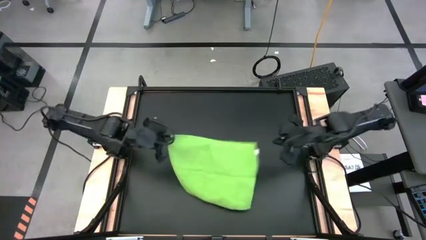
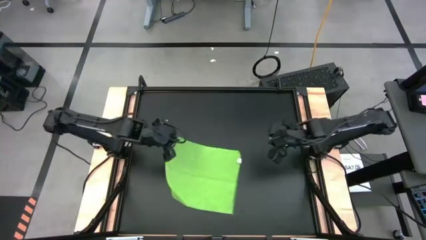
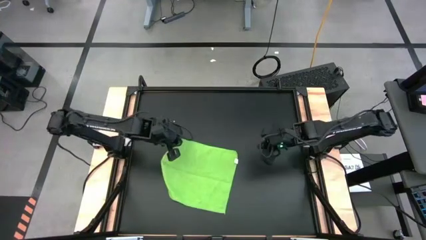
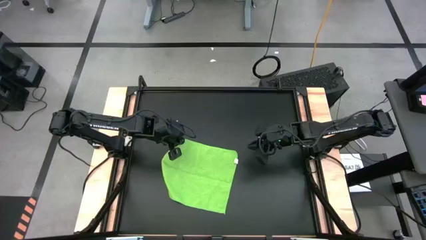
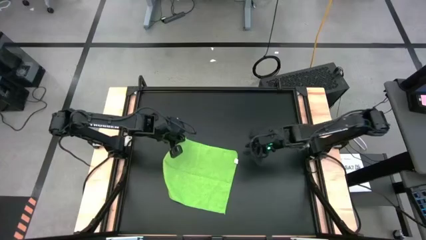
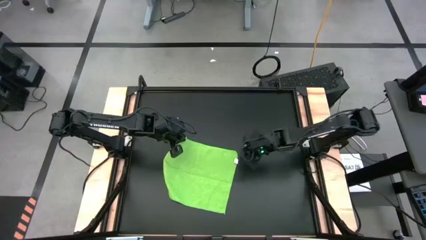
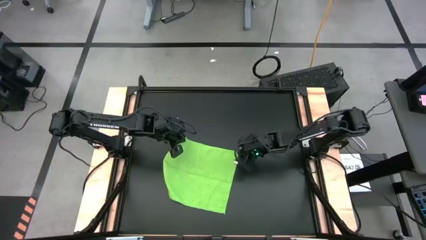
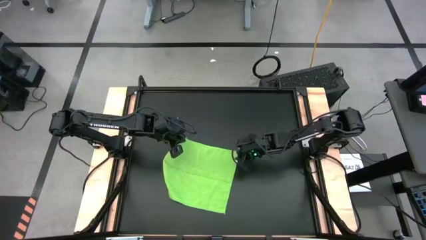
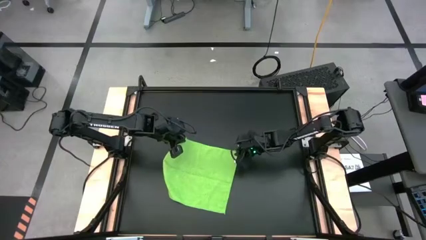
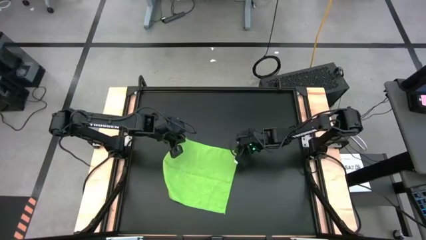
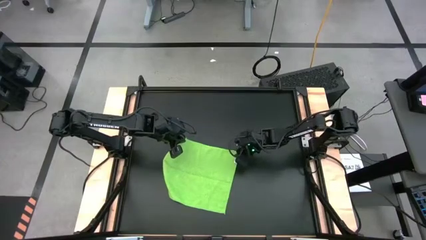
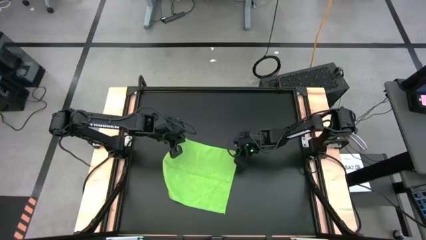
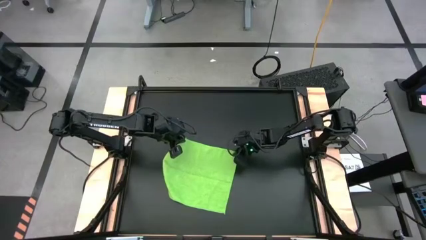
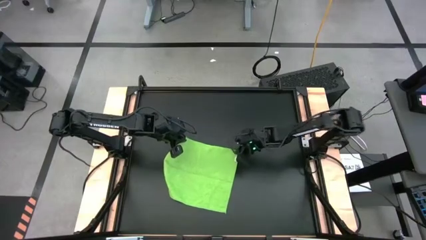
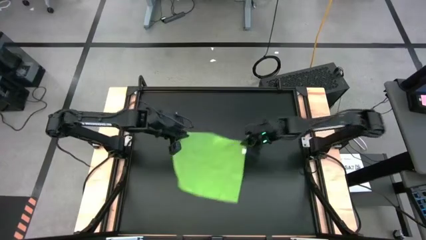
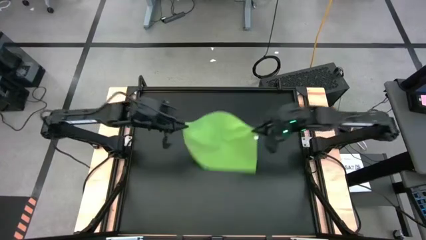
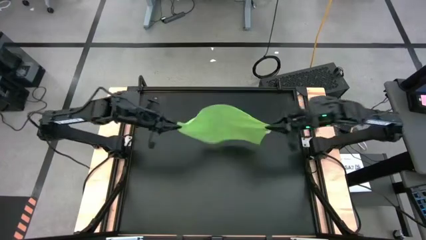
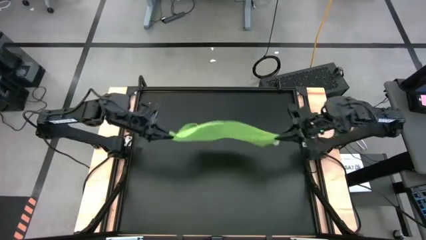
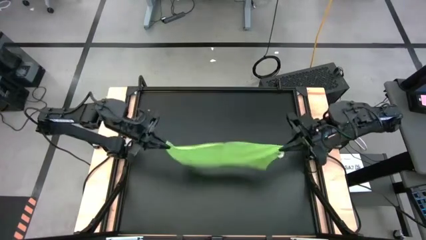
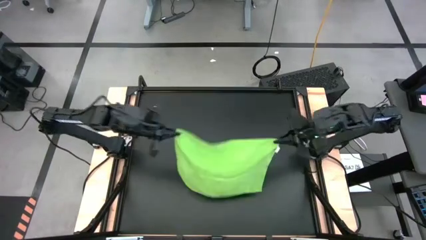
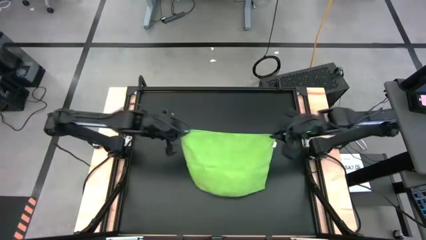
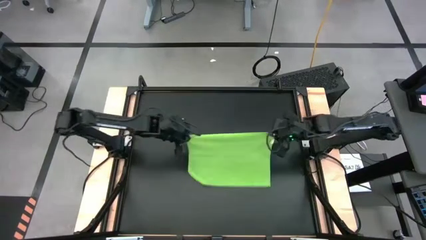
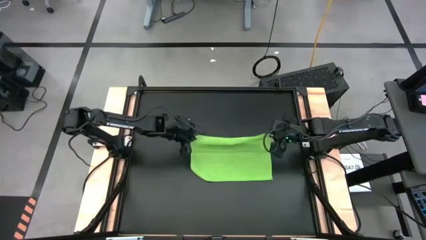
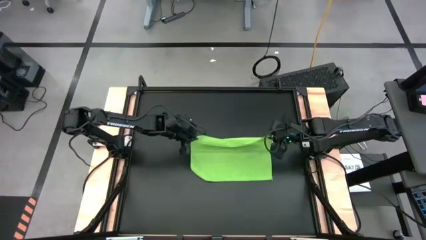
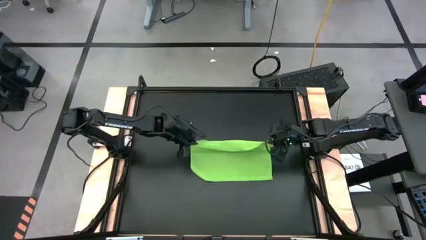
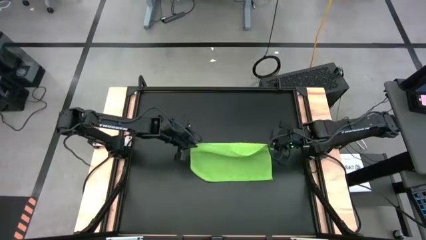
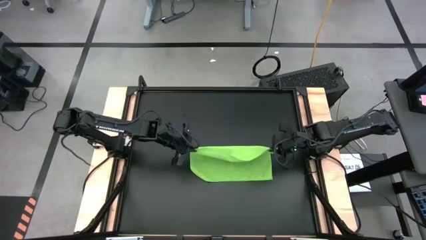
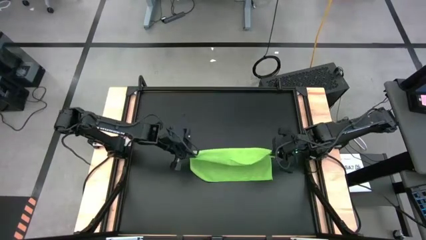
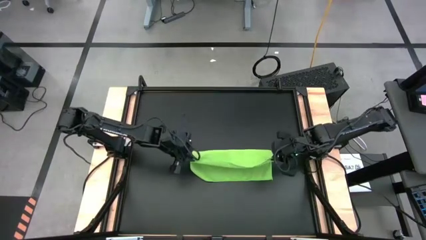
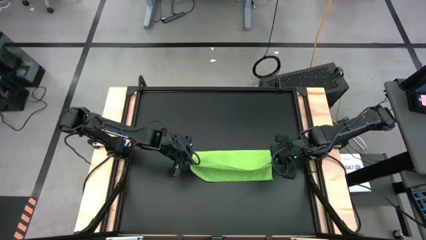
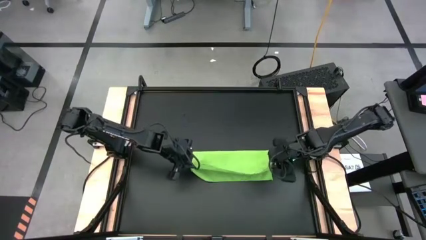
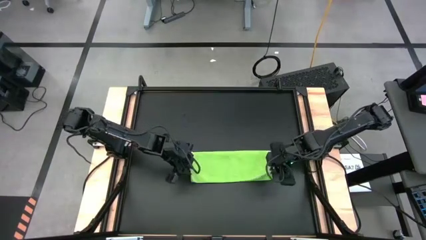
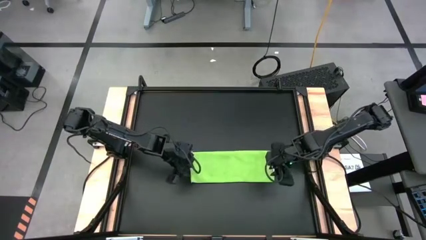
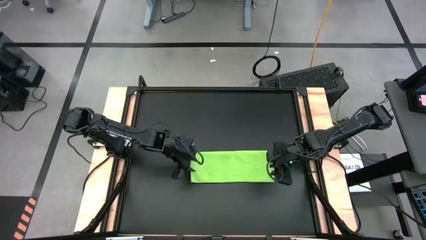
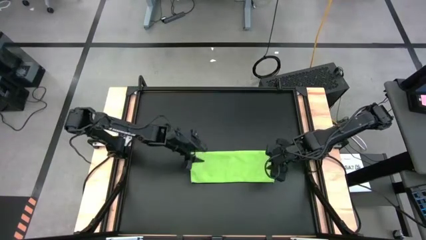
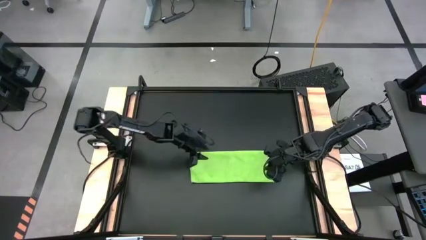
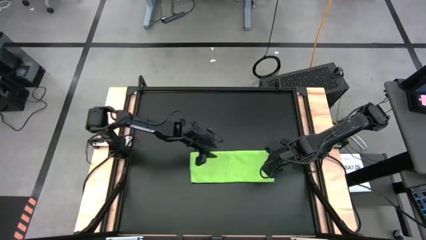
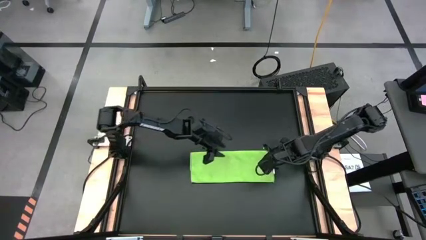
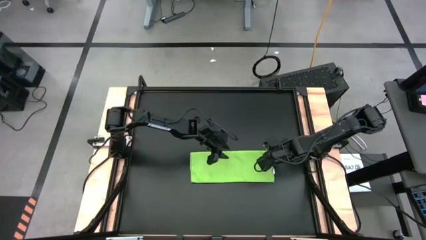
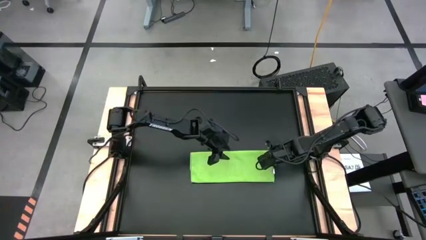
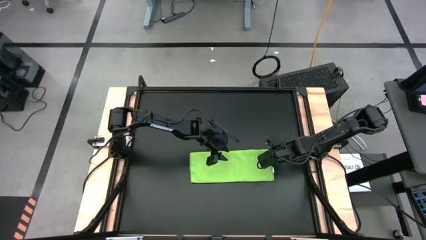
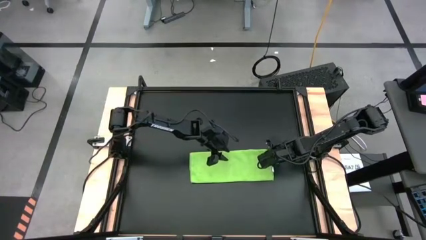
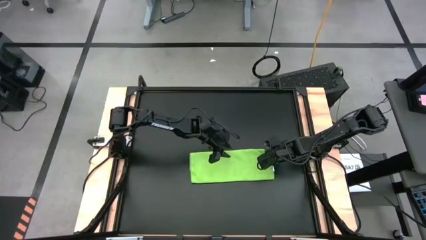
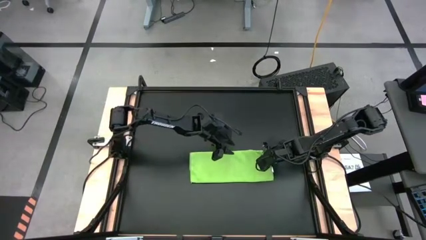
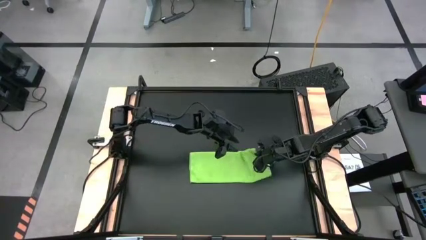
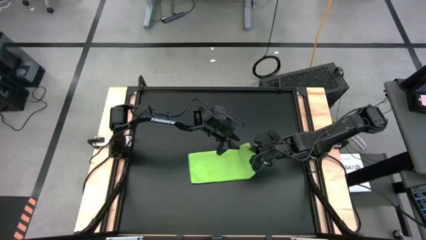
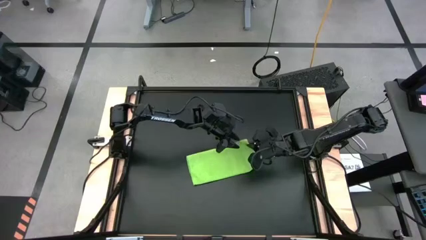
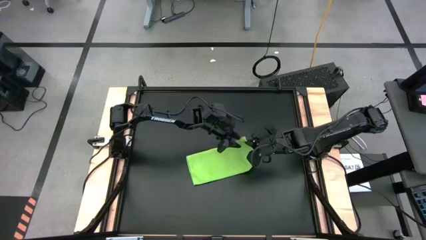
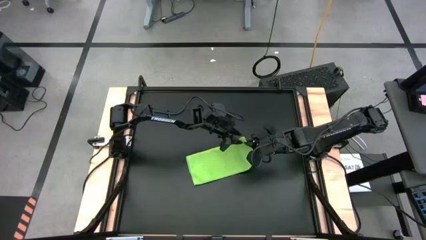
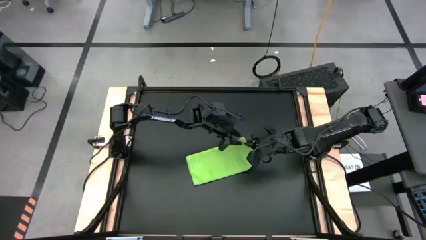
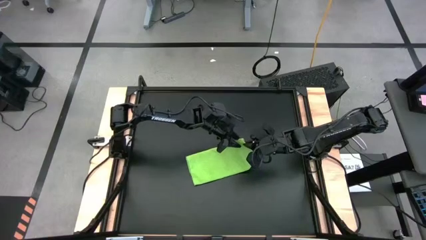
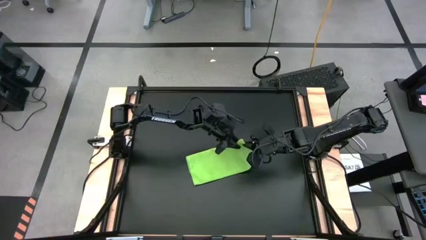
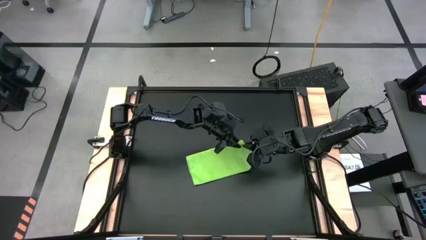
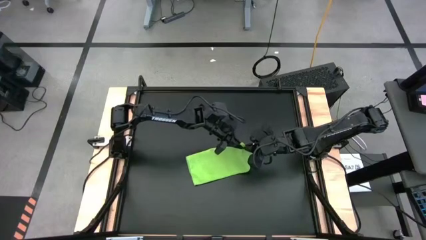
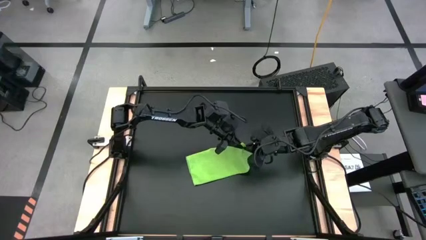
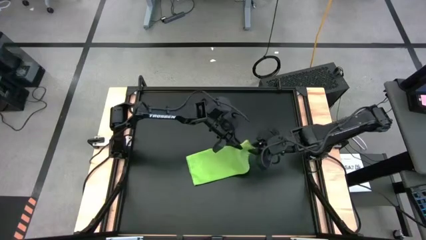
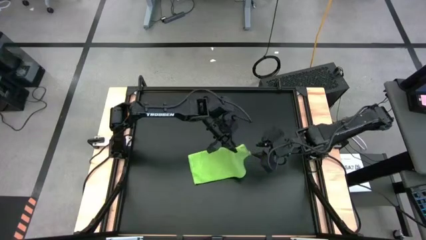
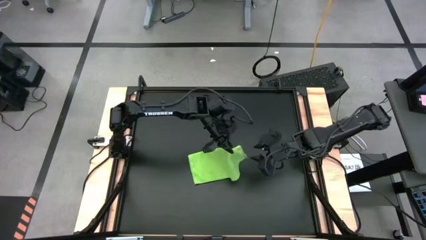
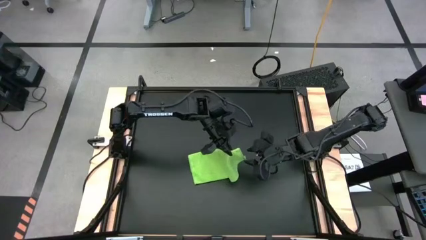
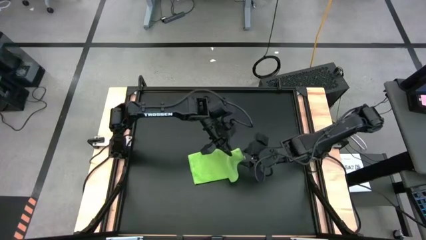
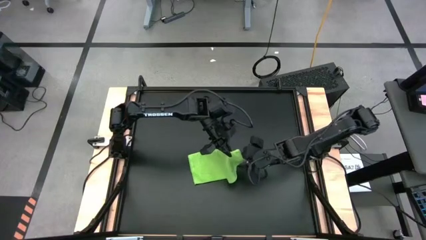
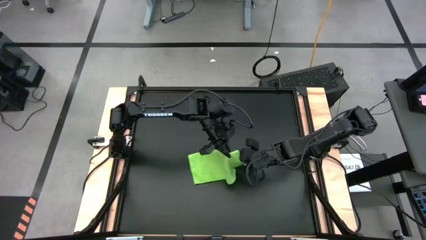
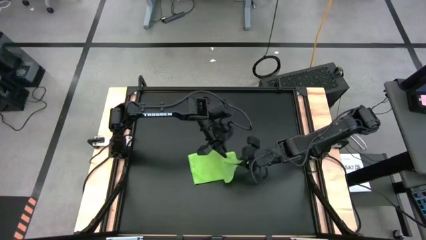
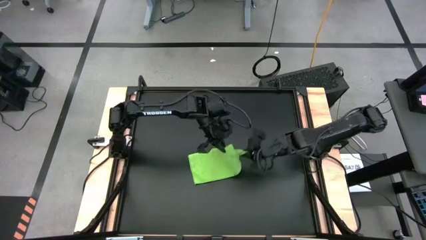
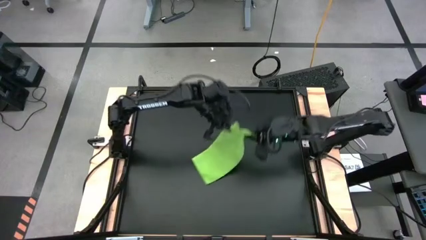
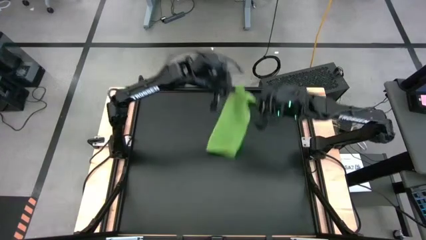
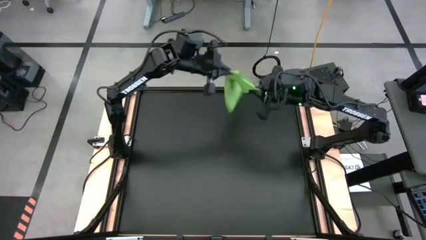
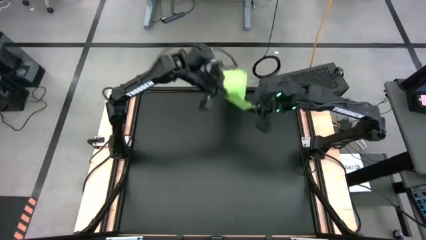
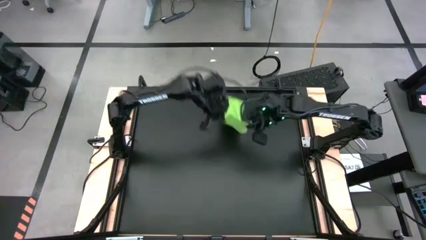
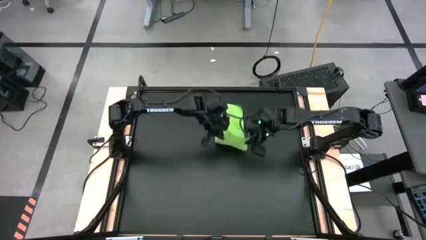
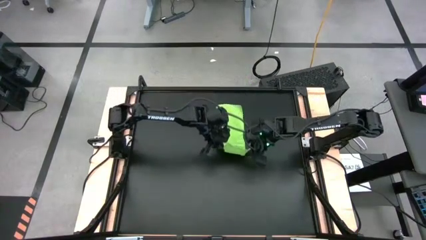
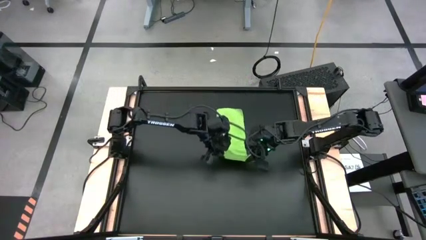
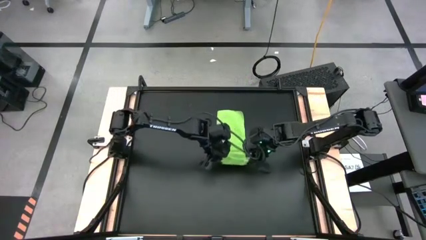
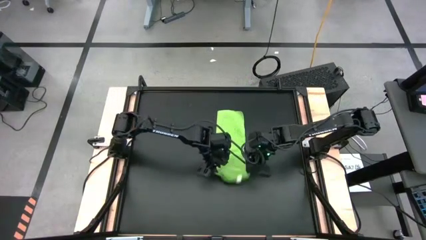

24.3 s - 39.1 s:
Task: Roll towel into tight, uniform cylinder
Fold the green towel
